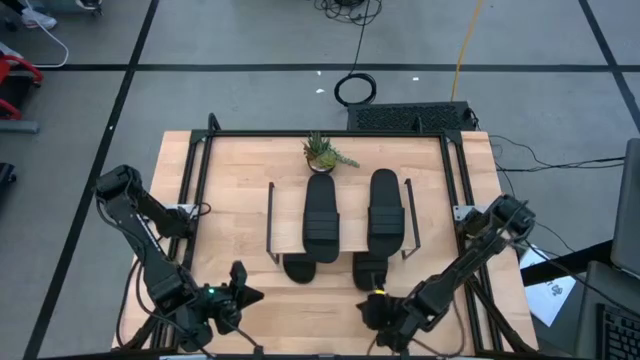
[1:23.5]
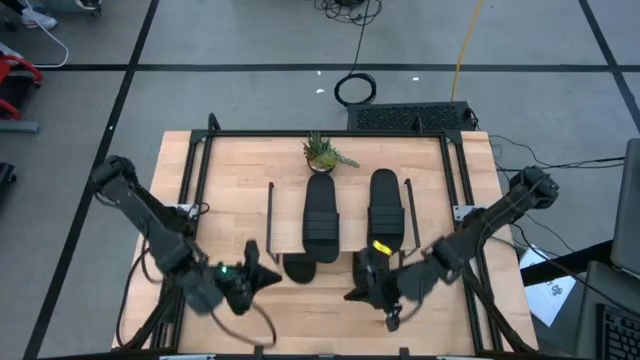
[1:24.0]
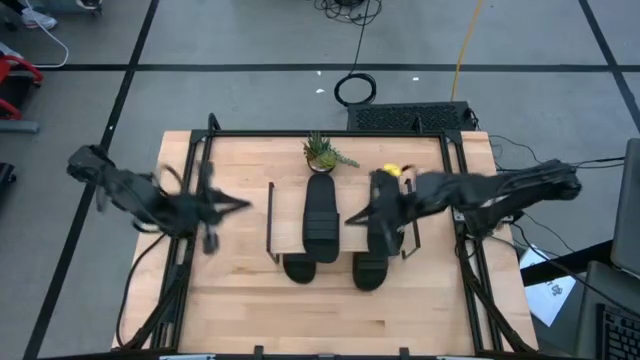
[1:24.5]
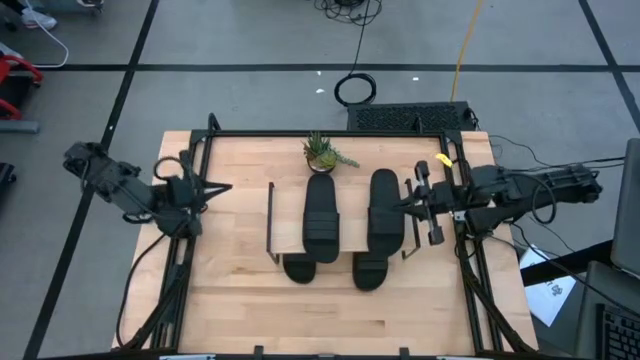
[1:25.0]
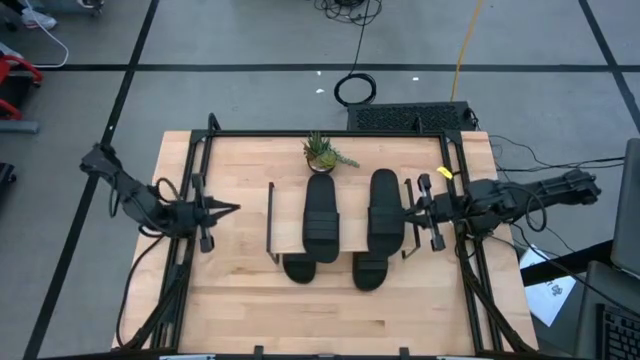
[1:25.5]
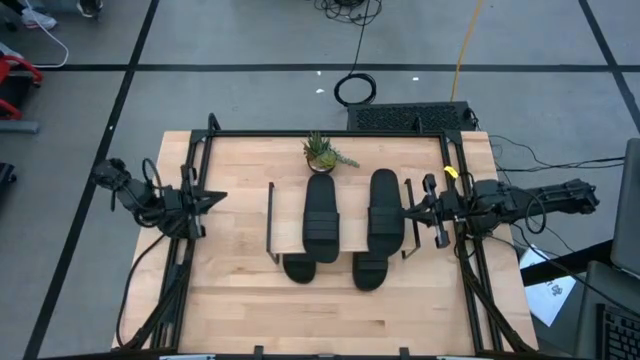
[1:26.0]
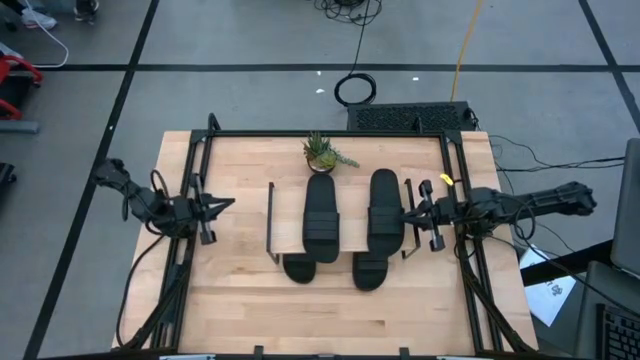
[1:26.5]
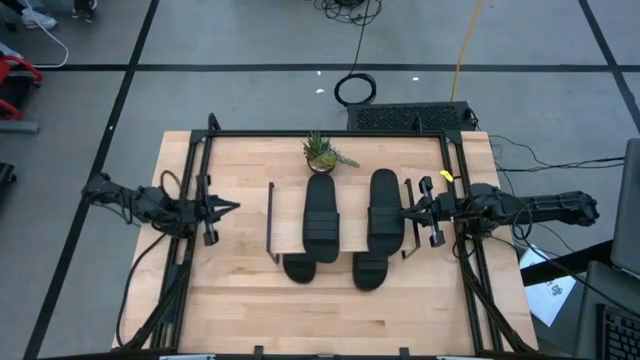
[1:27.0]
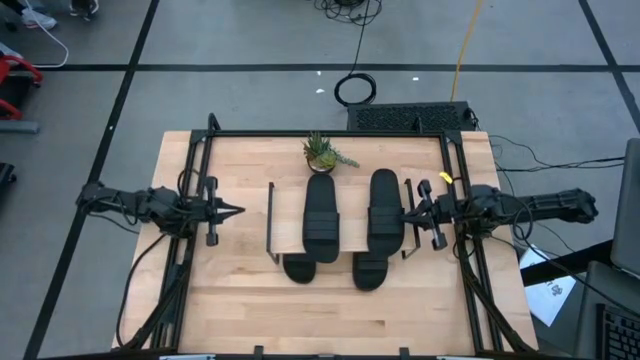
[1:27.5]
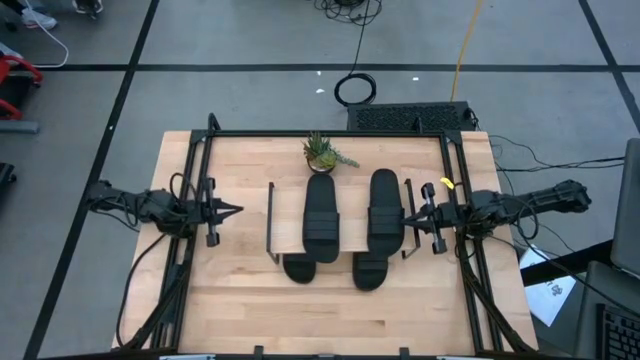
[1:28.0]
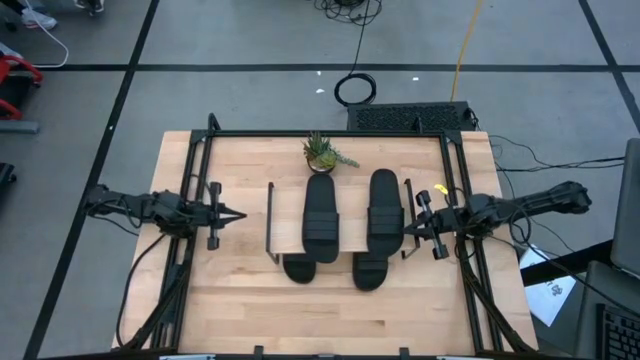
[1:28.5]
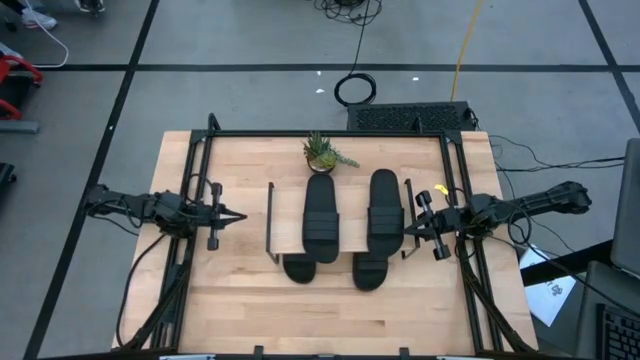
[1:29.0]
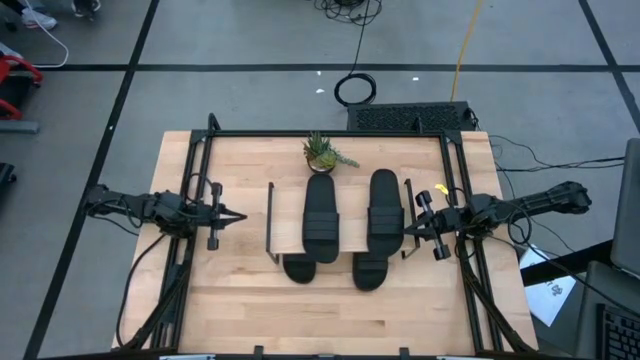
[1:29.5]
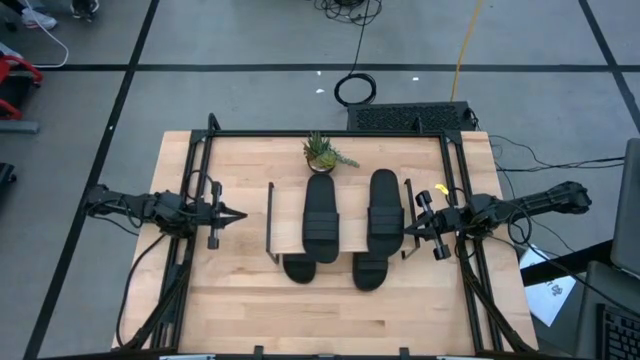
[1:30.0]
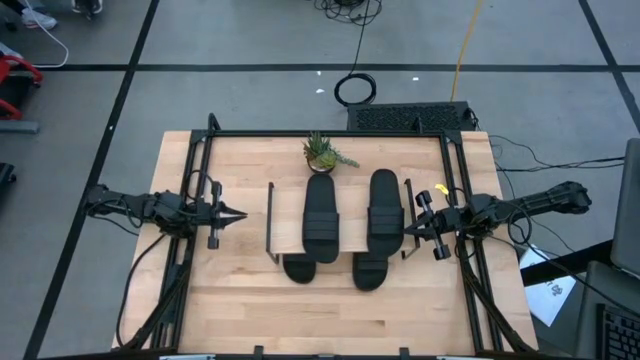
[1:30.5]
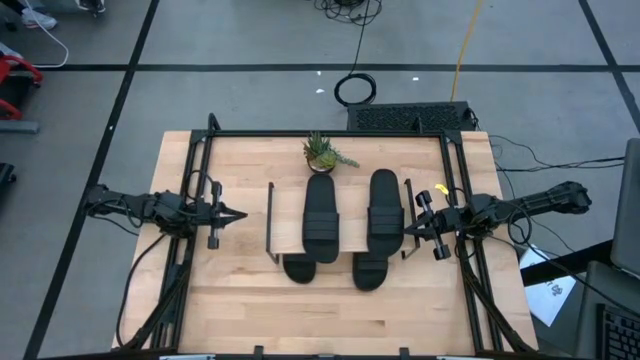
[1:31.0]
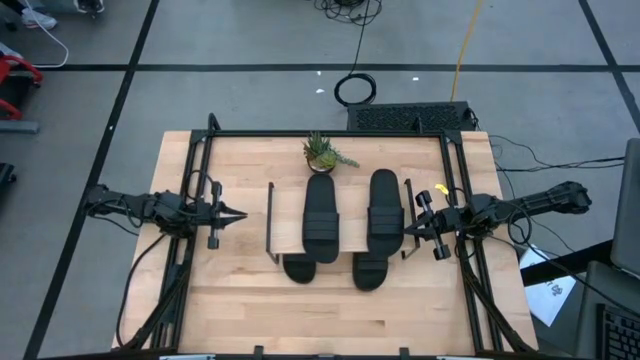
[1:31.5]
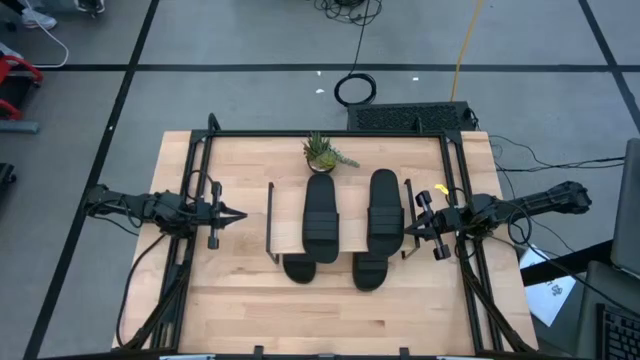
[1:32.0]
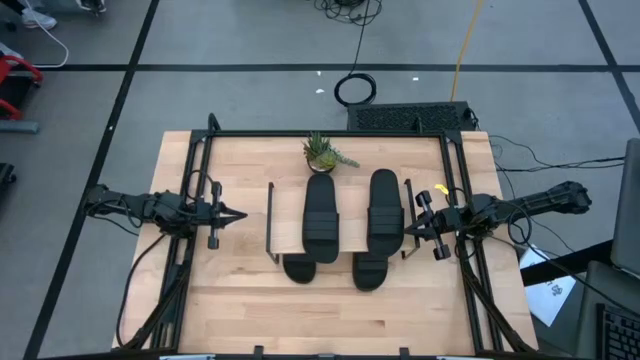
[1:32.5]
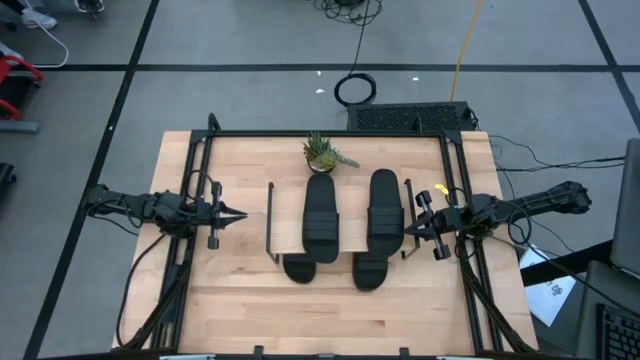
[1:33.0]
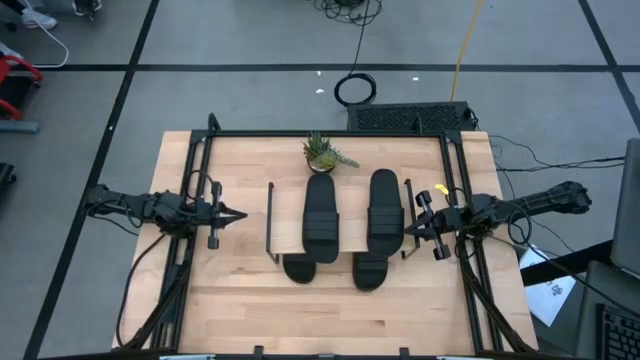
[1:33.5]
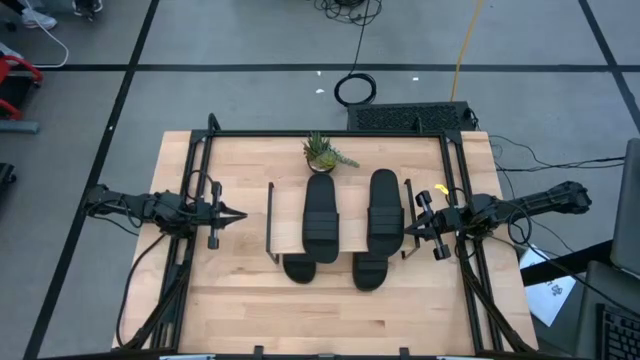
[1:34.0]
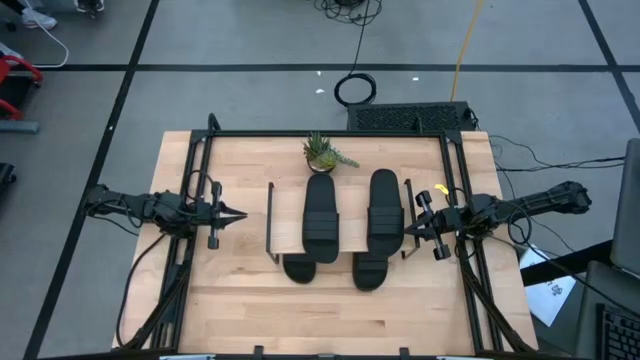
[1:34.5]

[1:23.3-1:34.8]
Task: Pick and place slides into the shelf
Return to Home Position

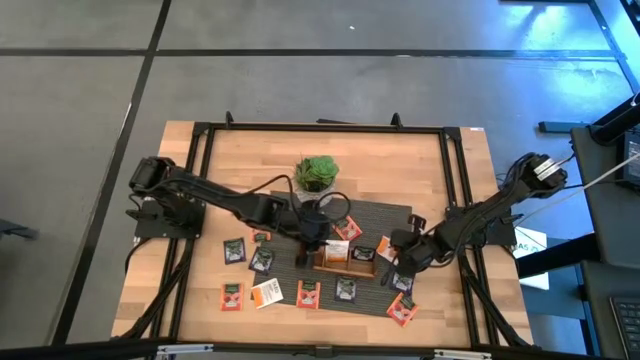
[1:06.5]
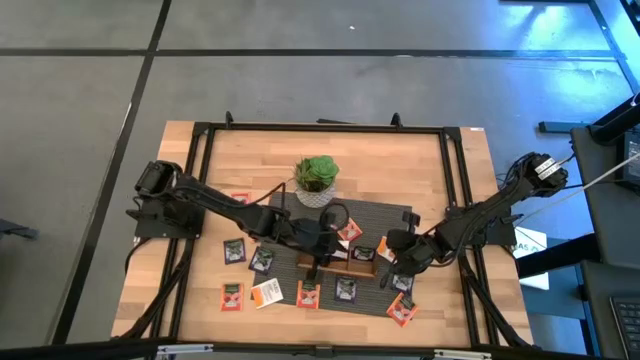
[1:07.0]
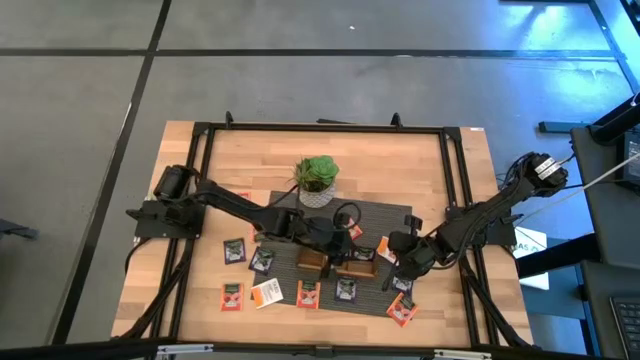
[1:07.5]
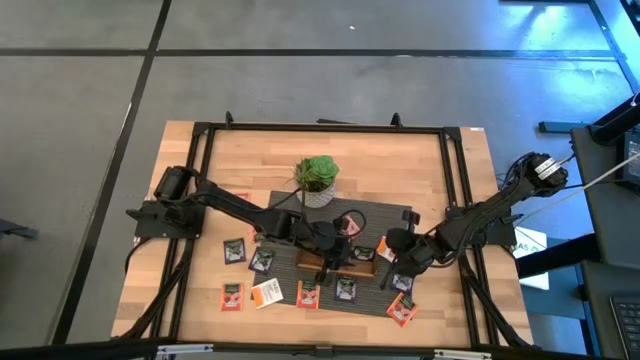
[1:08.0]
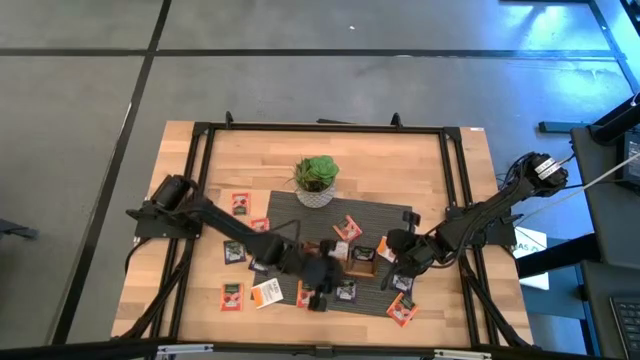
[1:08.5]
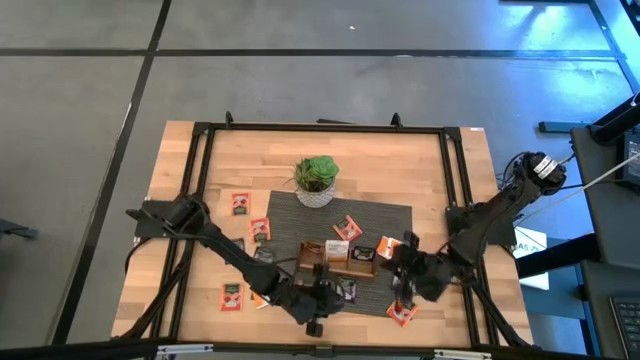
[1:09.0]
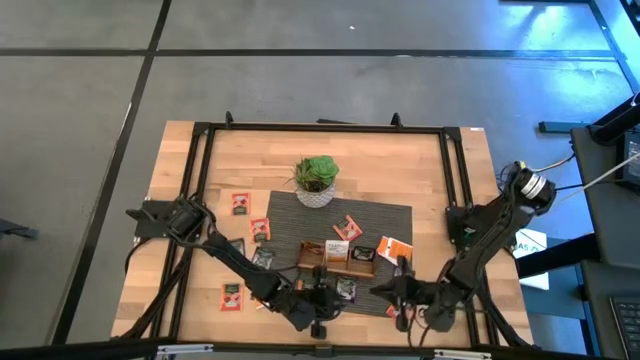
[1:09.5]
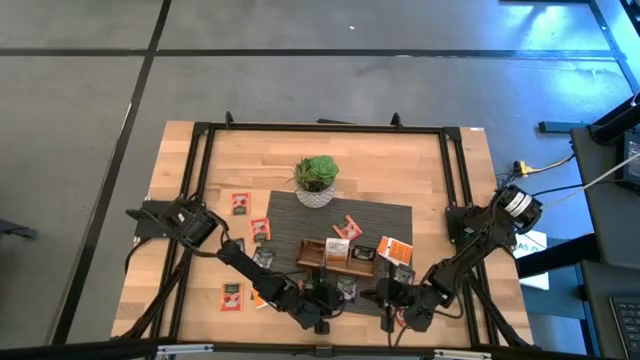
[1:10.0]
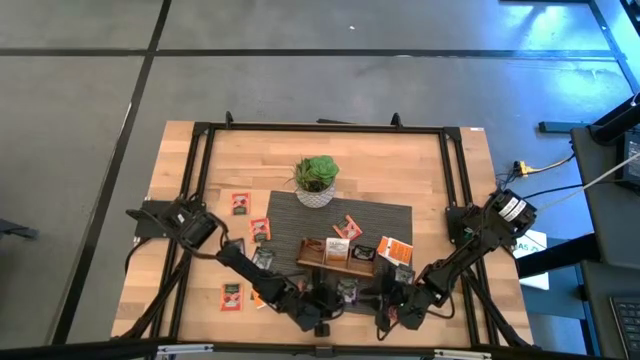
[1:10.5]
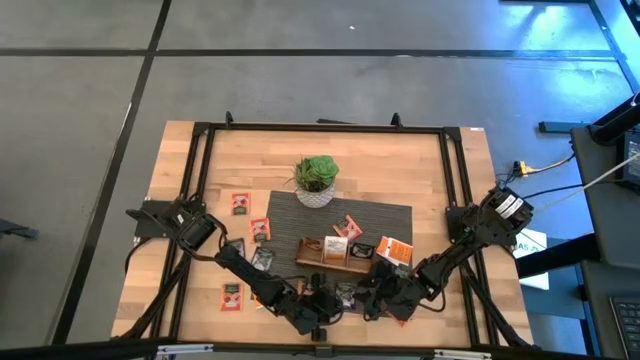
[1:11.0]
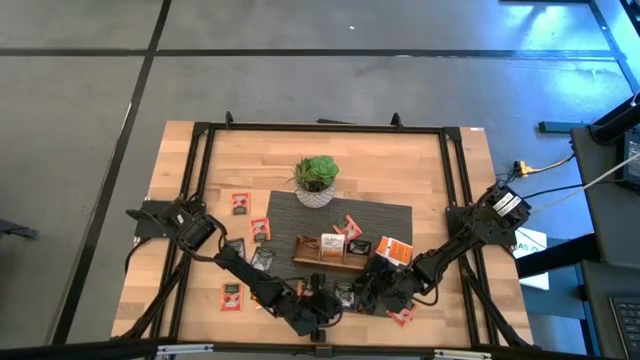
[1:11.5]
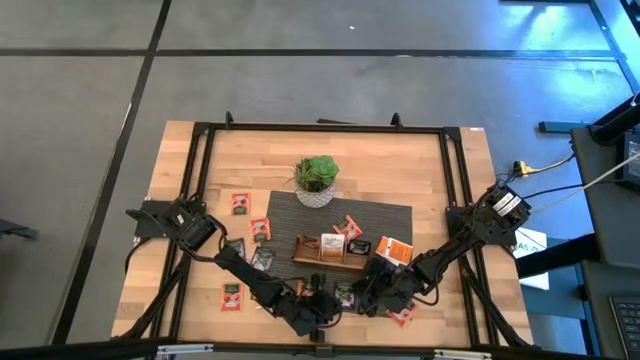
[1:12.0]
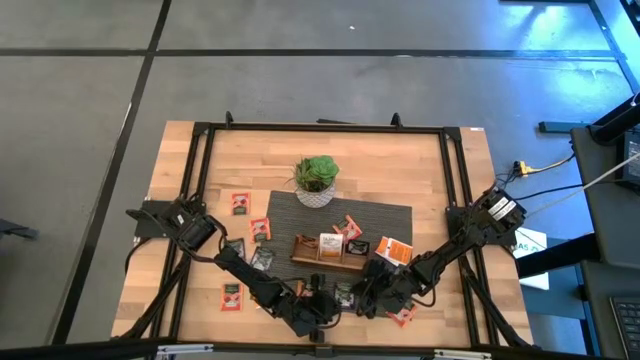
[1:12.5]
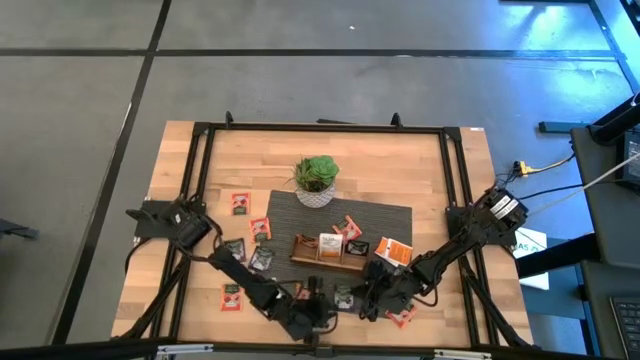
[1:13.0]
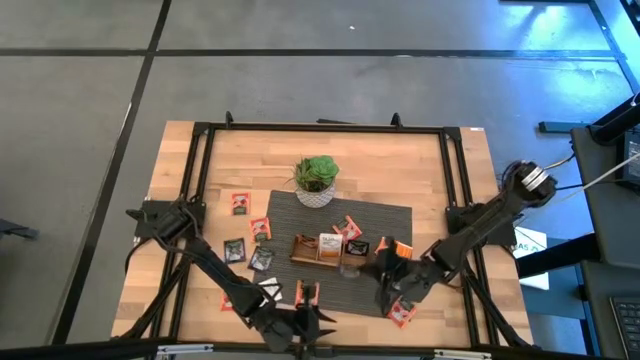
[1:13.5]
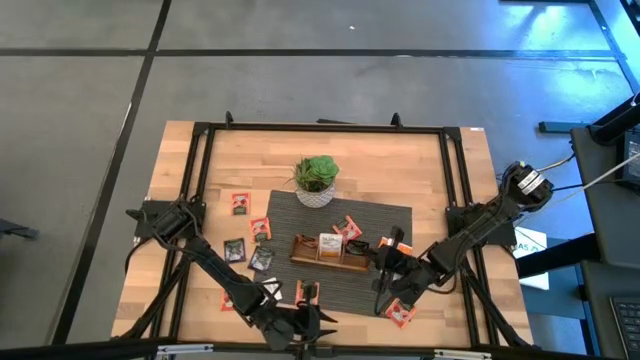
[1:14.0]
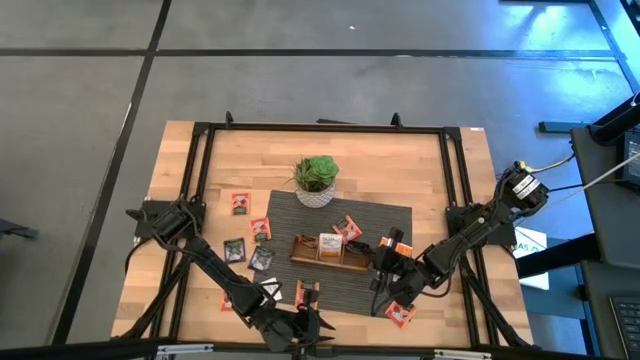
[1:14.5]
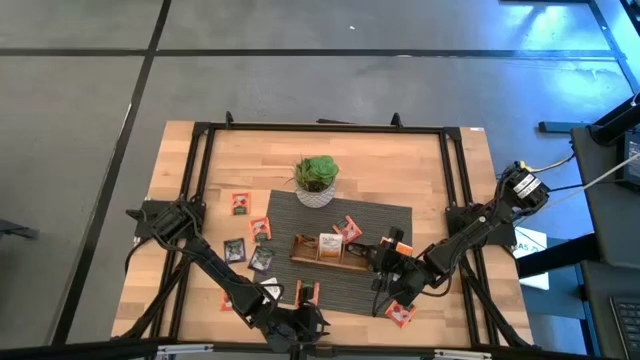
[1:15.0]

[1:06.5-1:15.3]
Task: Pick & Place Tea
Put the violet tea bag into the right section of the wooden organizer
